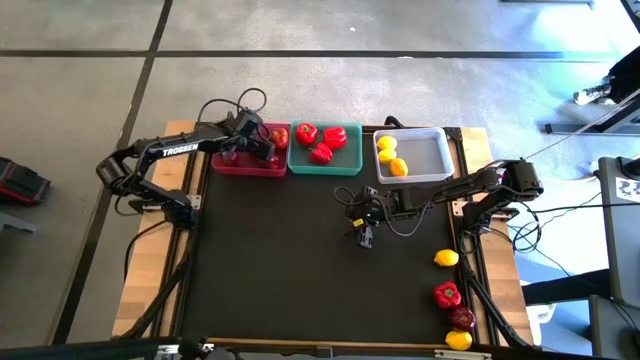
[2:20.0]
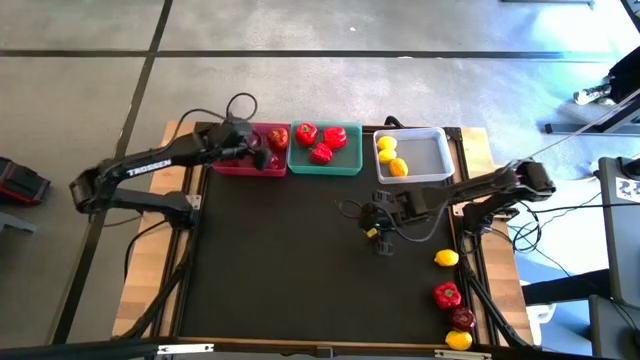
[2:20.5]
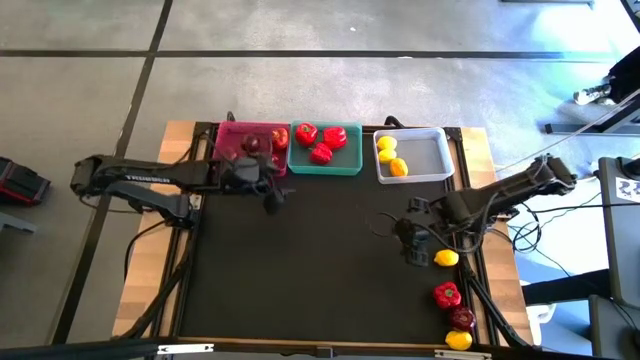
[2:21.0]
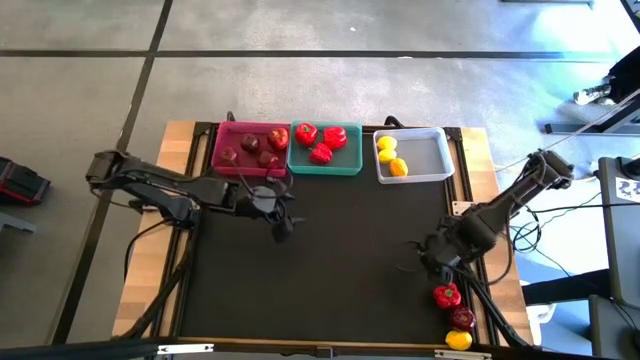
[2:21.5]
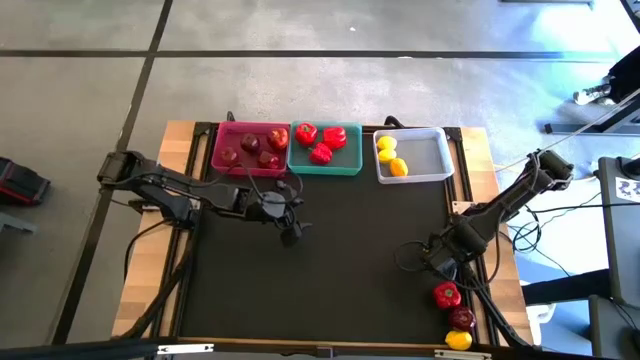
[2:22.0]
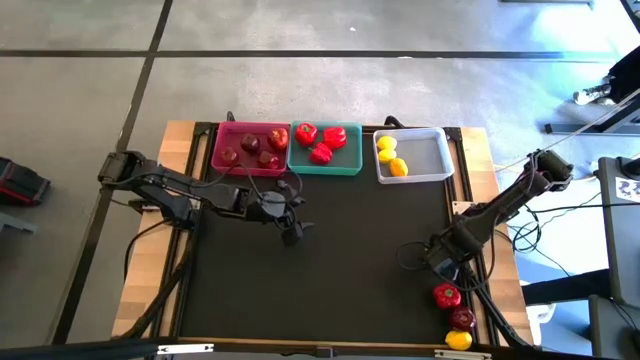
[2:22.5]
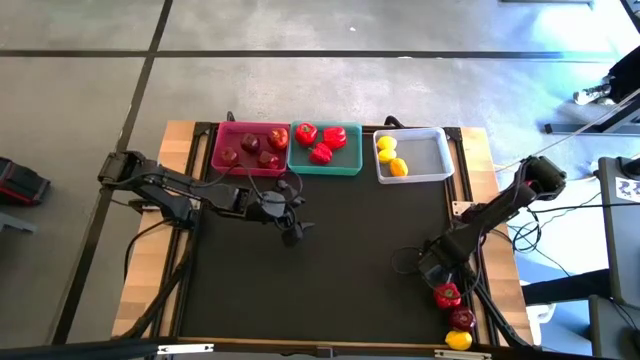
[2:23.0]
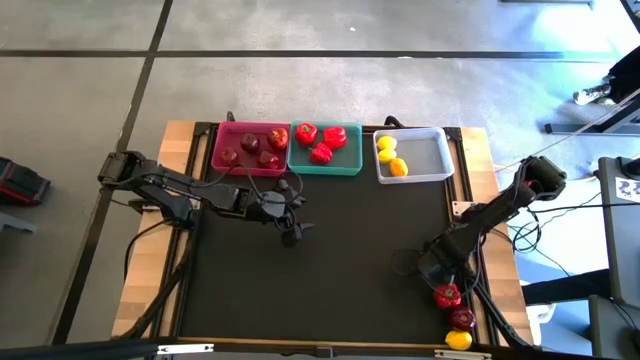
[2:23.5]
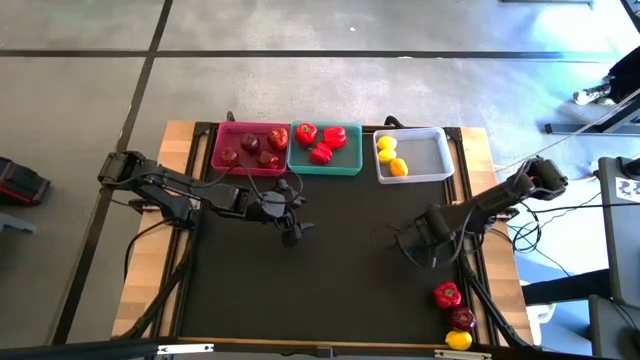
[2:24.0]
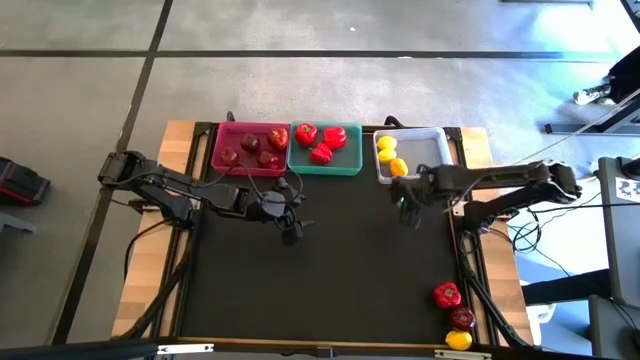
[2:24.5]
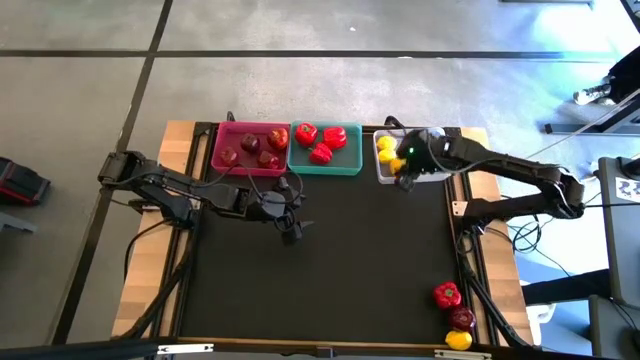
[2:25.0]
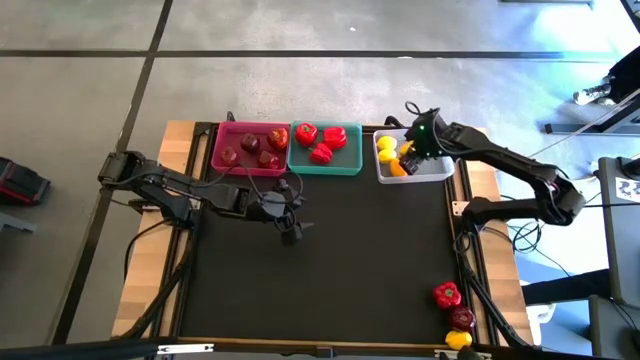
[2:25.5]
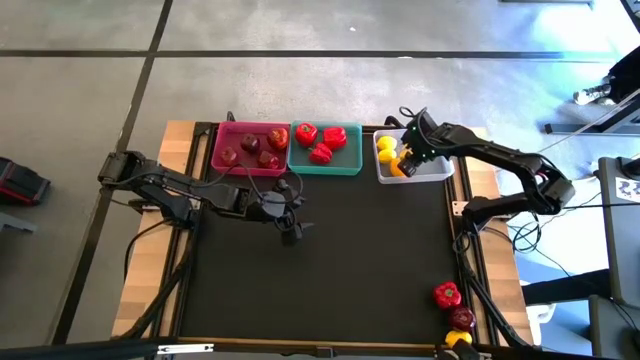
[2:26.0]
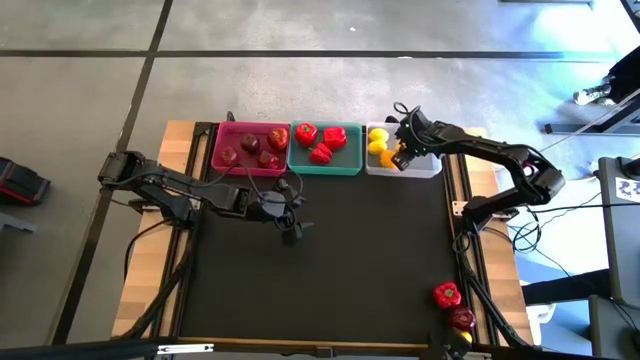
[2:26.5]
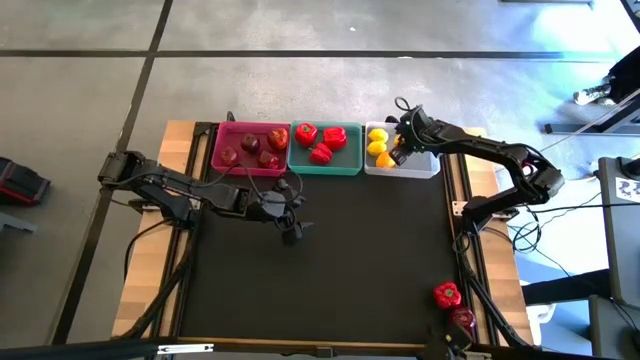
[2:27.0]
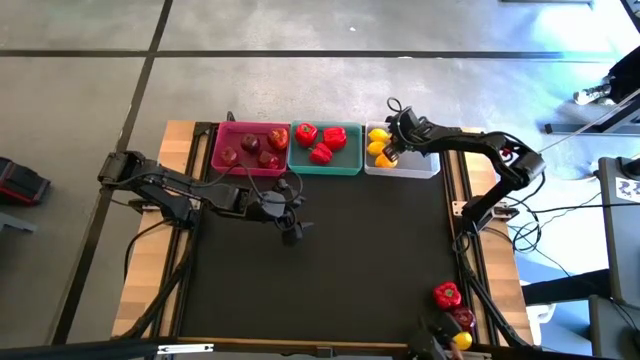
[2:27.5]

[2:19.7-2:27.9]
Task: Sort produce into baskets
Put the lemon into the white bin

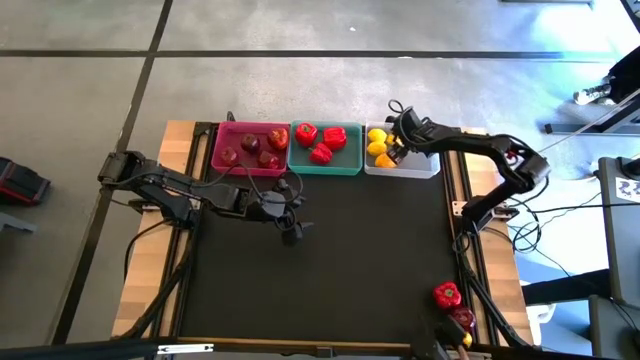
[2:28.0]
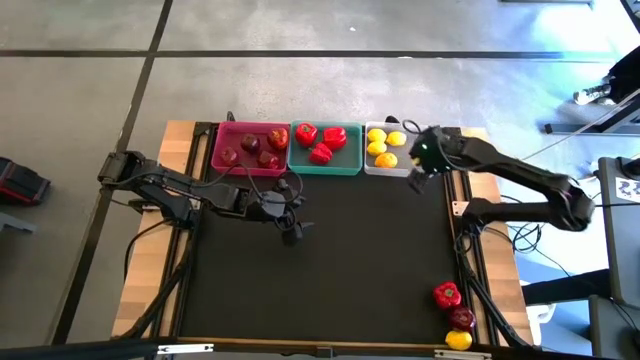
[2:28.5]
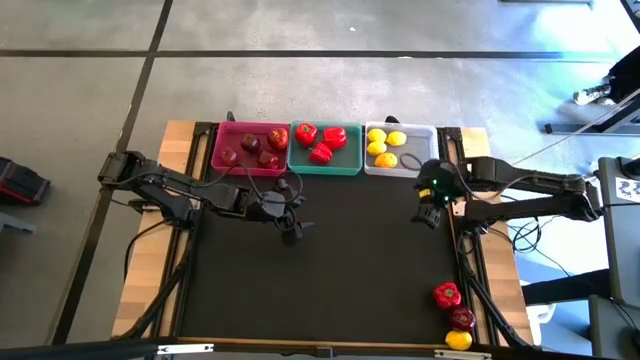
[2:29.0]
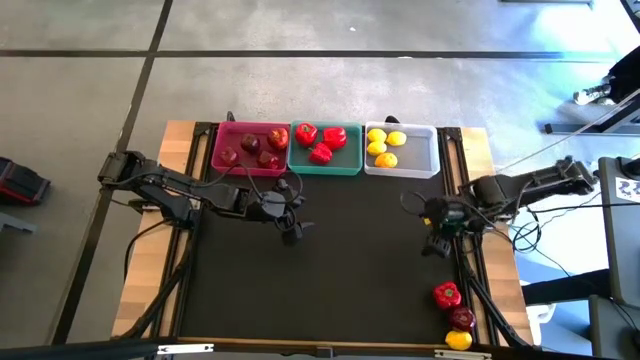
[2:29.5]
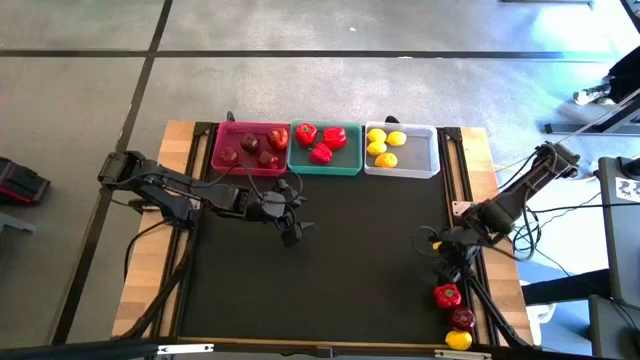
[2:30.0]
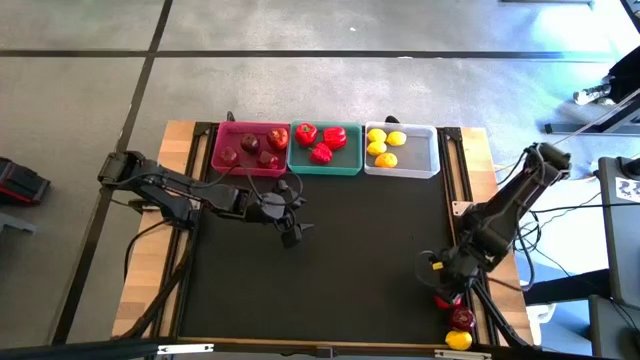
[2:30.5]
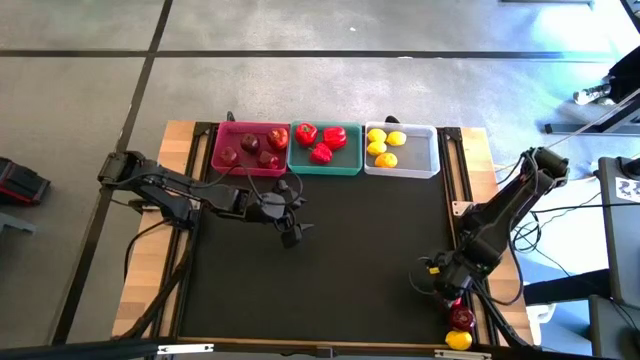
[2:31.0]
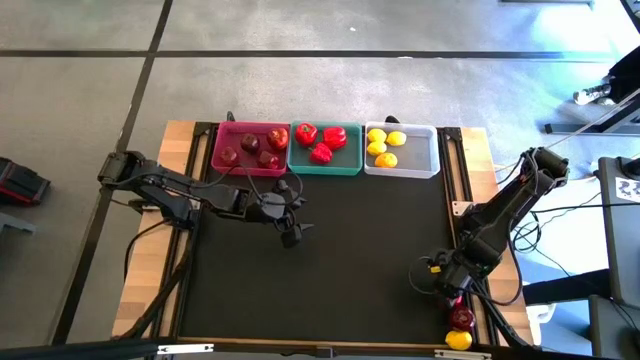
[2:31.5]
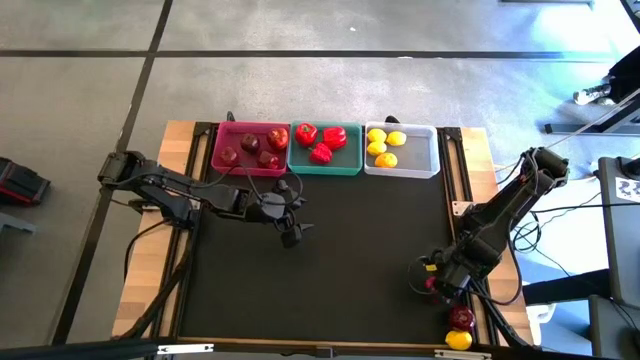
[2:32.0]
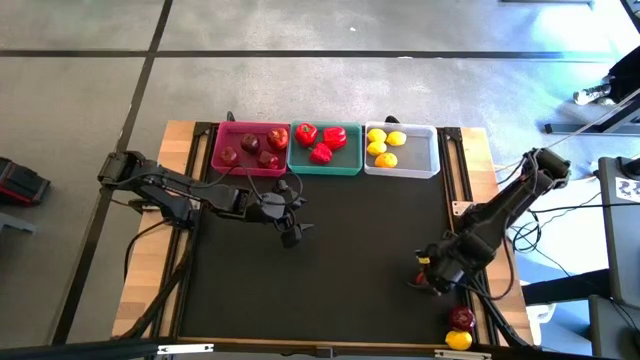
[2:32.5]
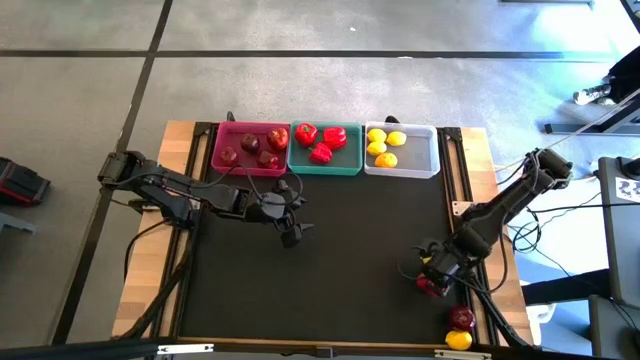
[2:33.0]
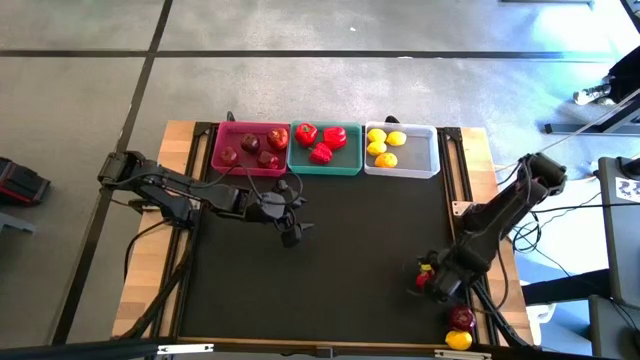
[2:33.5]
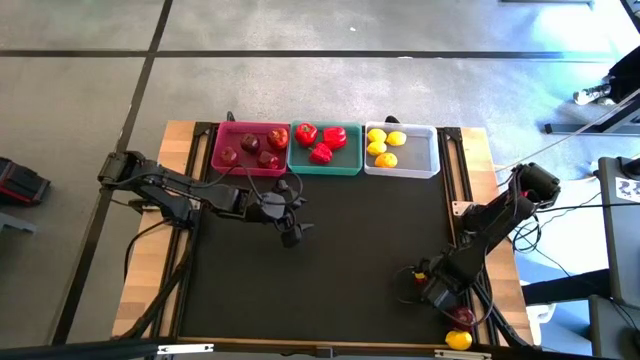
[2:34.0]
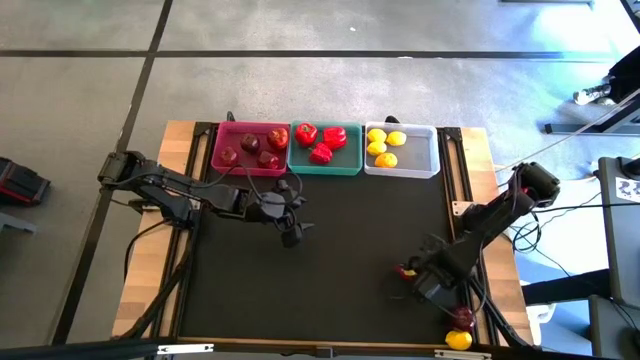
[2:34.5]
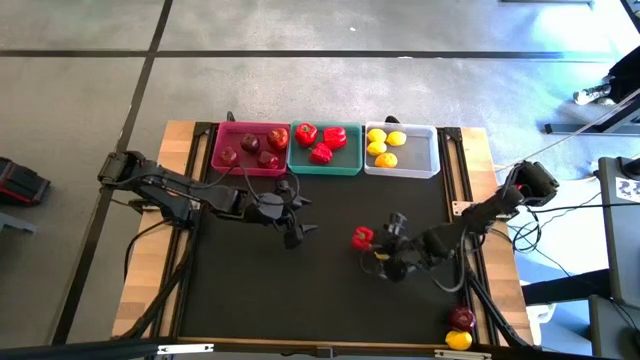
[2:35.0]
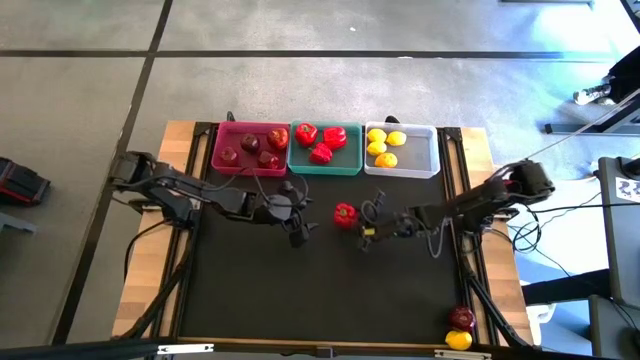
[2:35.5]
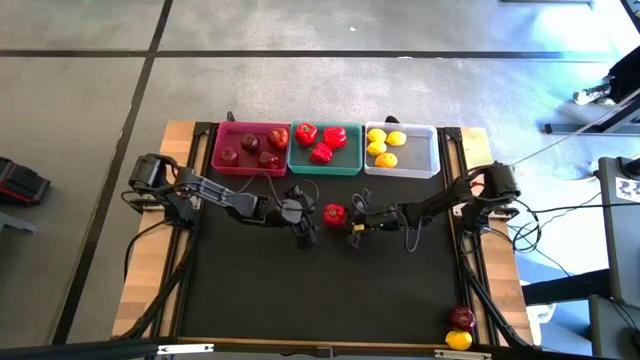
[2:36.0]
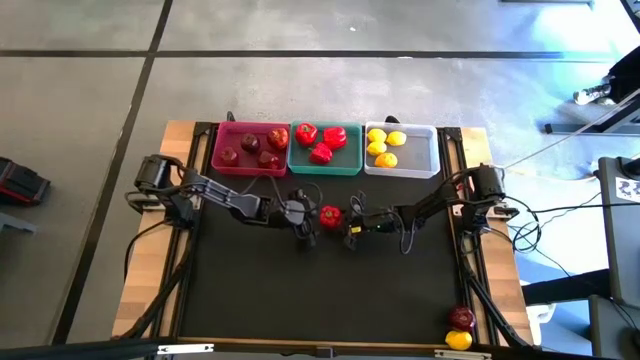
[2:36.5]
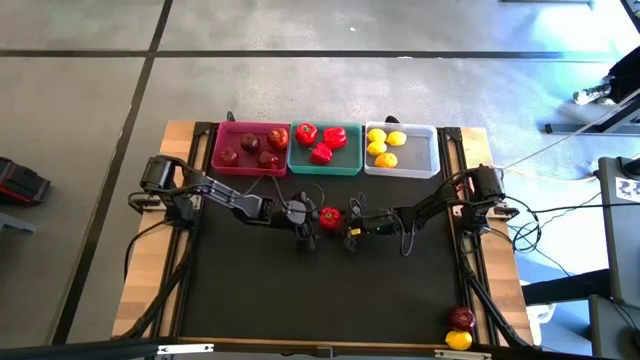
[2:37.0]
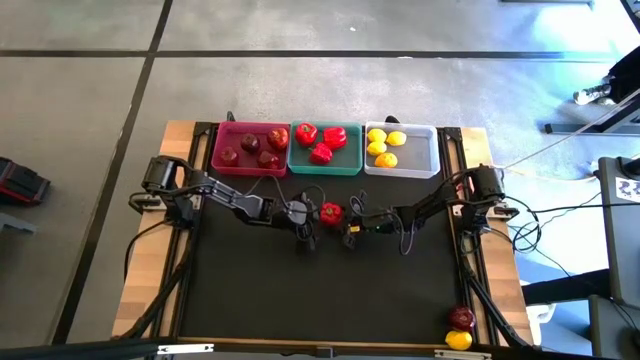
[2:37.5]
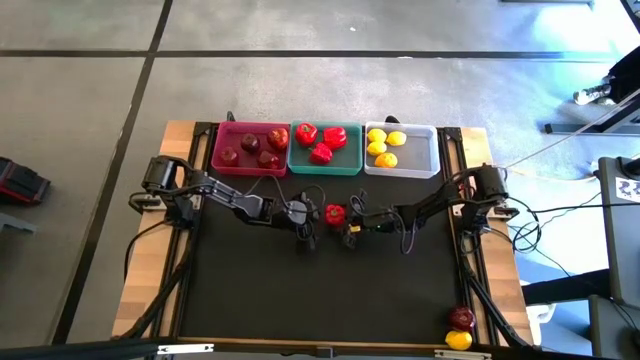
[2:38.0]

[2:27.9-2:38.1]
Put the red bell pepper into the green bin
